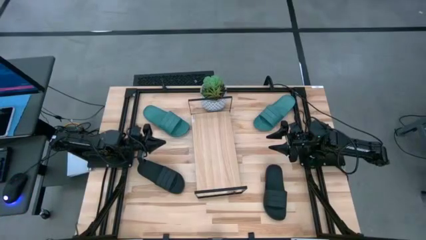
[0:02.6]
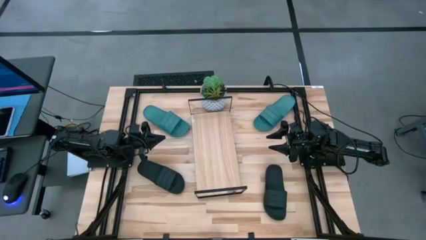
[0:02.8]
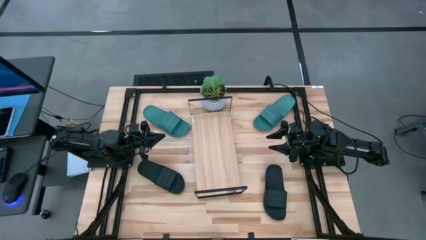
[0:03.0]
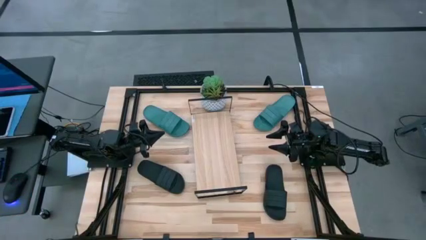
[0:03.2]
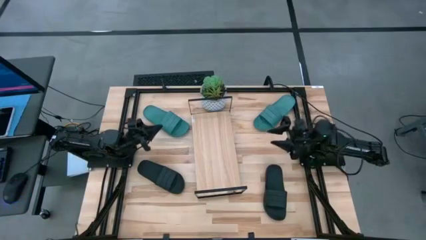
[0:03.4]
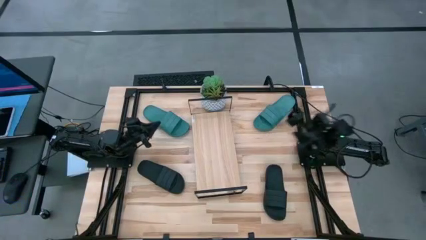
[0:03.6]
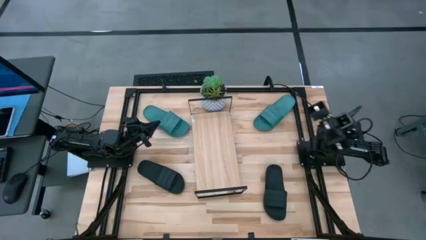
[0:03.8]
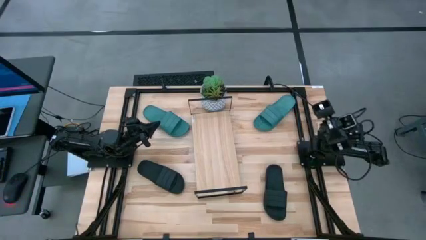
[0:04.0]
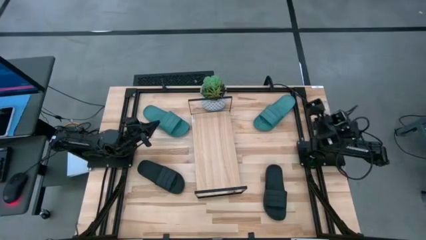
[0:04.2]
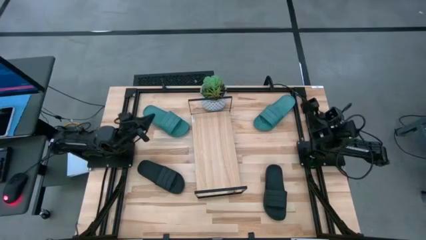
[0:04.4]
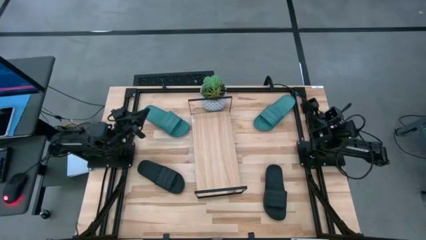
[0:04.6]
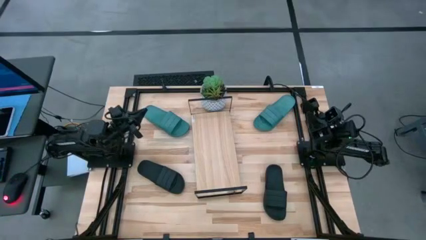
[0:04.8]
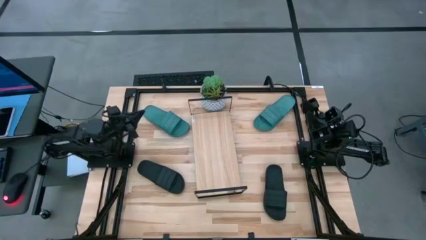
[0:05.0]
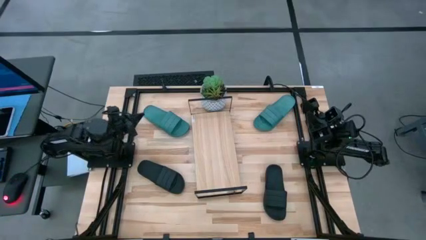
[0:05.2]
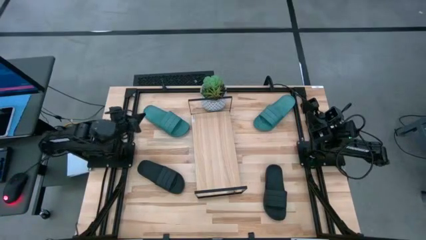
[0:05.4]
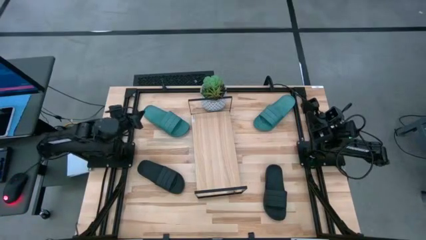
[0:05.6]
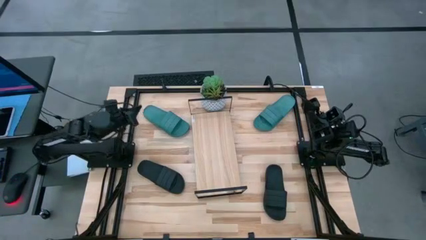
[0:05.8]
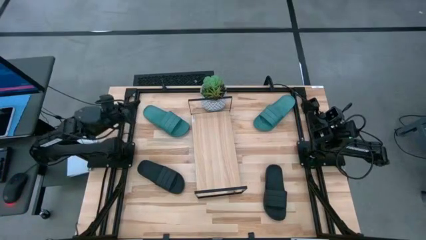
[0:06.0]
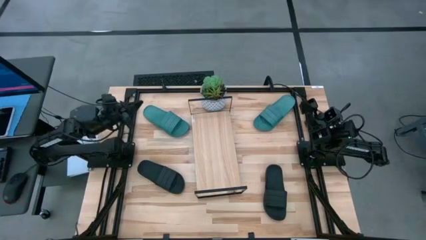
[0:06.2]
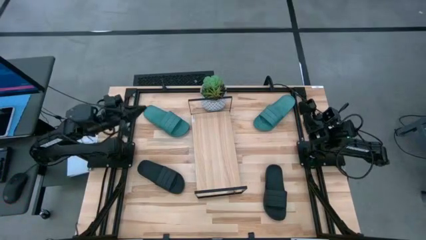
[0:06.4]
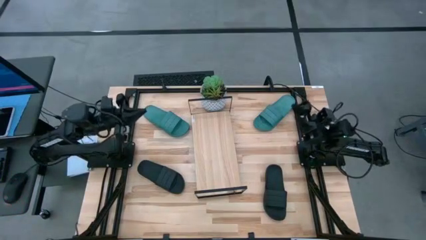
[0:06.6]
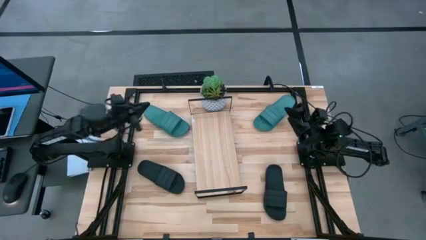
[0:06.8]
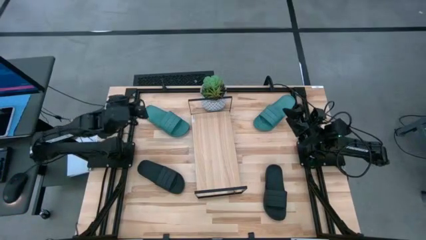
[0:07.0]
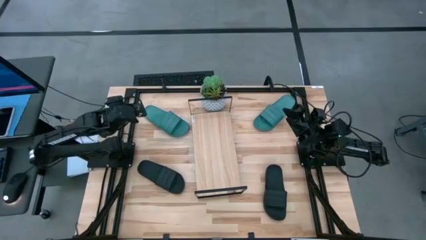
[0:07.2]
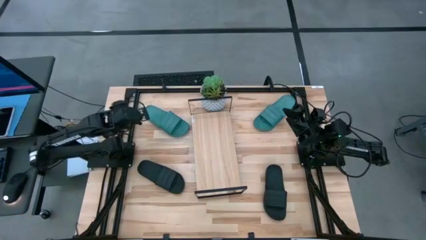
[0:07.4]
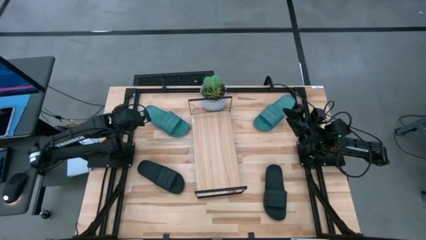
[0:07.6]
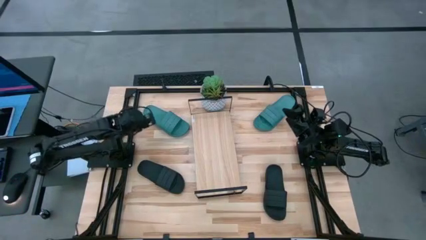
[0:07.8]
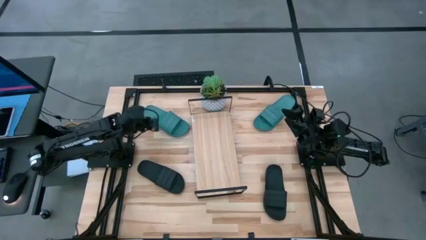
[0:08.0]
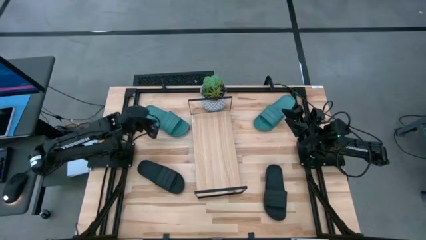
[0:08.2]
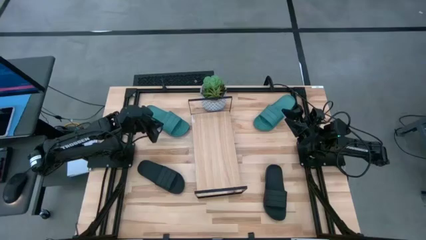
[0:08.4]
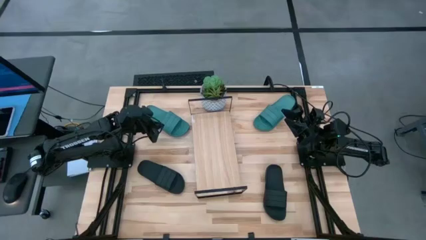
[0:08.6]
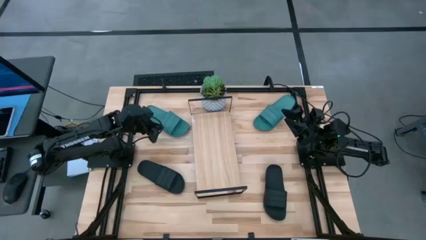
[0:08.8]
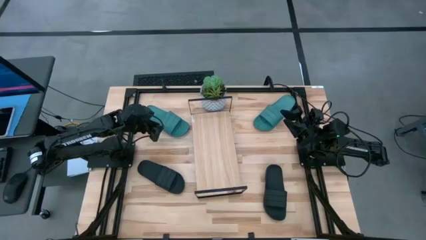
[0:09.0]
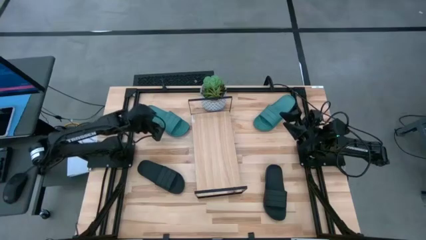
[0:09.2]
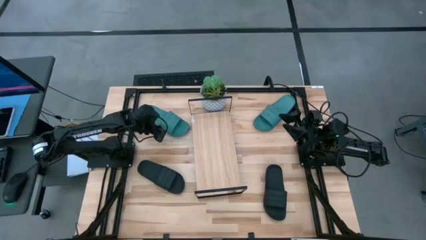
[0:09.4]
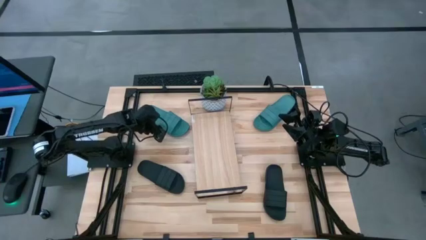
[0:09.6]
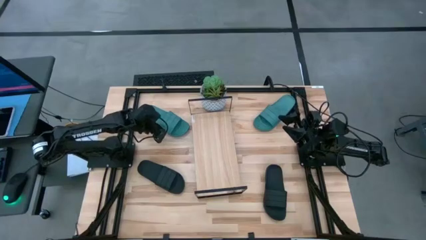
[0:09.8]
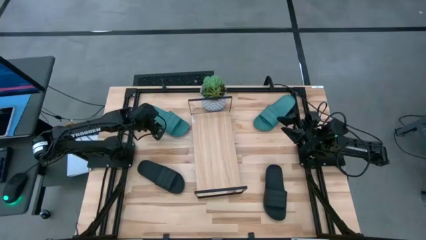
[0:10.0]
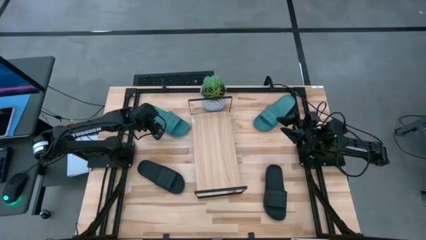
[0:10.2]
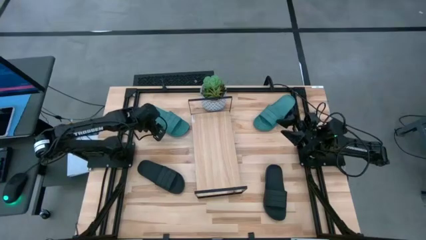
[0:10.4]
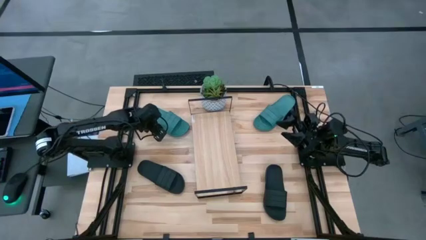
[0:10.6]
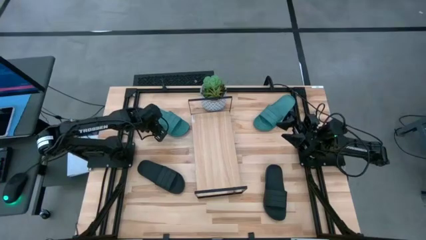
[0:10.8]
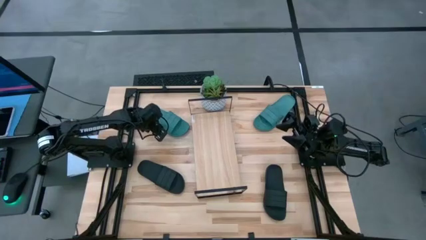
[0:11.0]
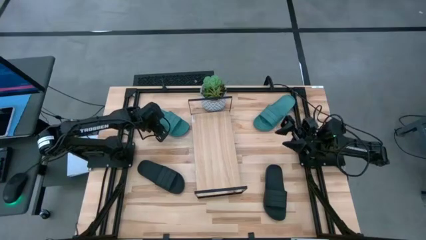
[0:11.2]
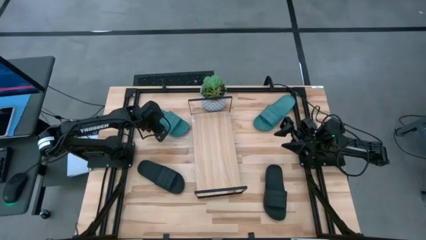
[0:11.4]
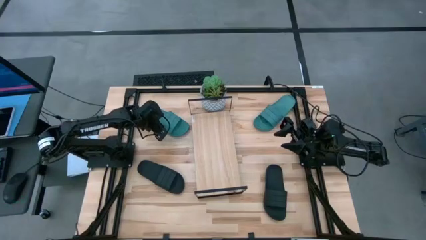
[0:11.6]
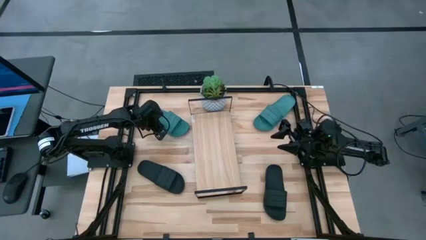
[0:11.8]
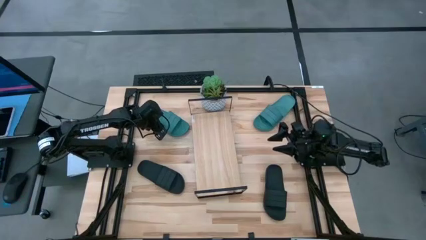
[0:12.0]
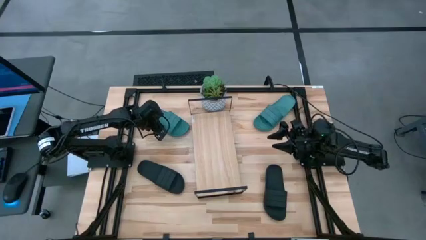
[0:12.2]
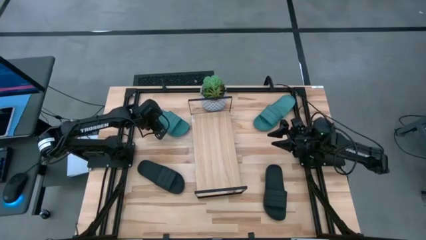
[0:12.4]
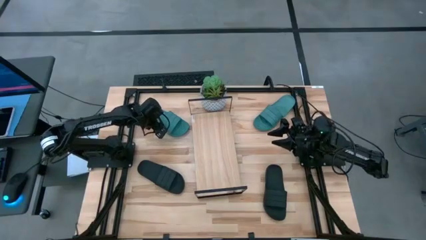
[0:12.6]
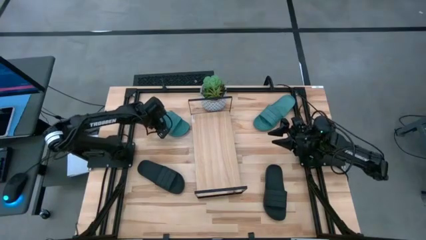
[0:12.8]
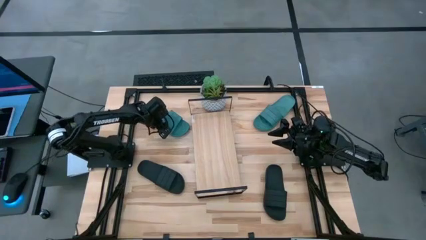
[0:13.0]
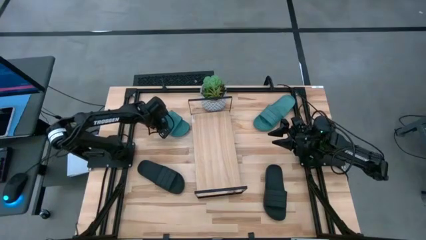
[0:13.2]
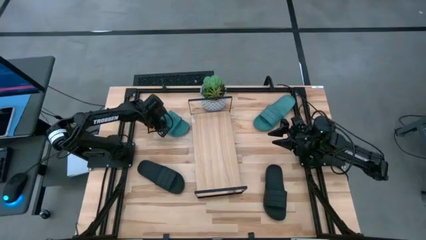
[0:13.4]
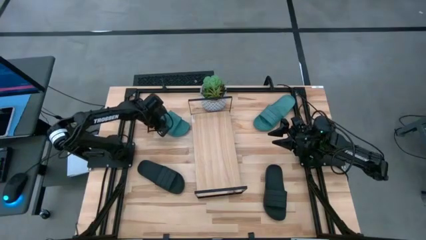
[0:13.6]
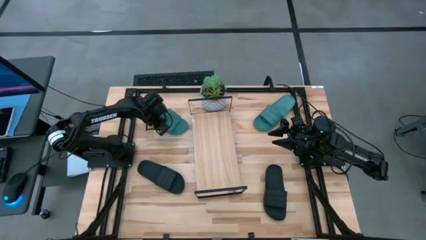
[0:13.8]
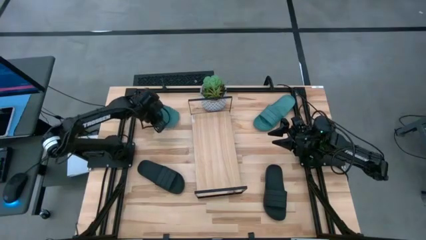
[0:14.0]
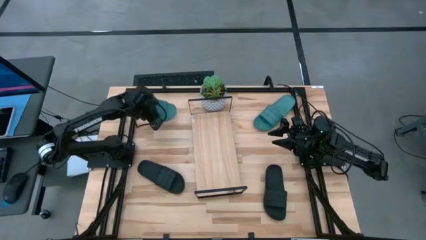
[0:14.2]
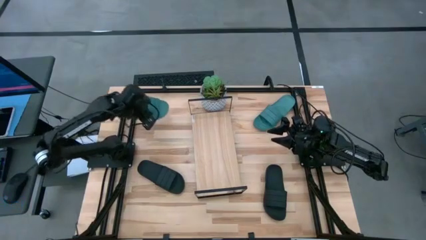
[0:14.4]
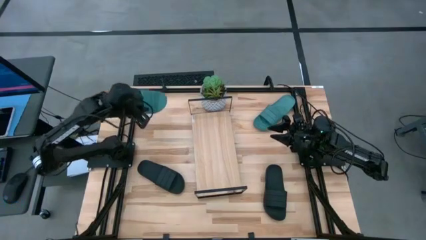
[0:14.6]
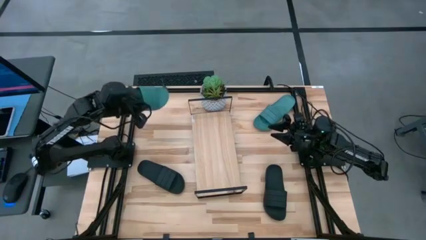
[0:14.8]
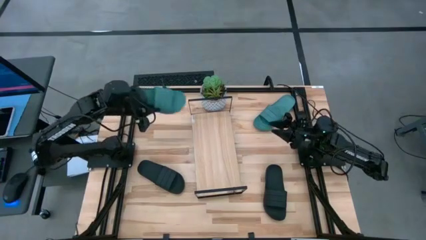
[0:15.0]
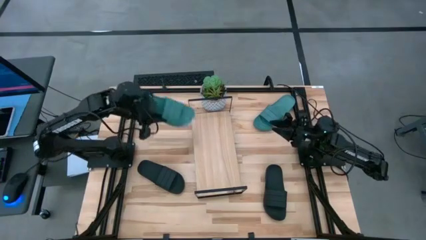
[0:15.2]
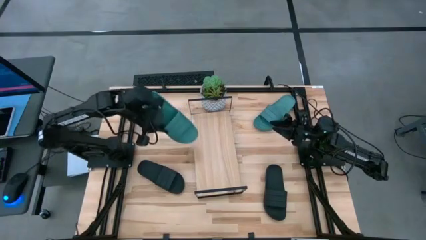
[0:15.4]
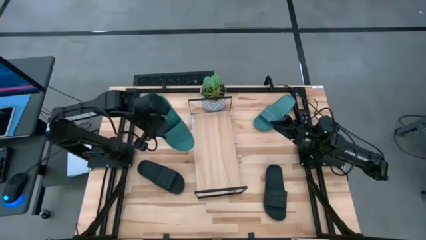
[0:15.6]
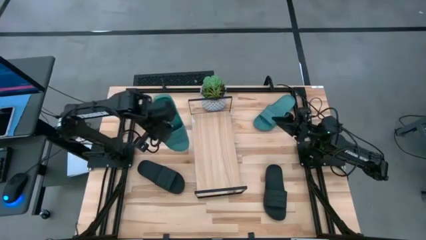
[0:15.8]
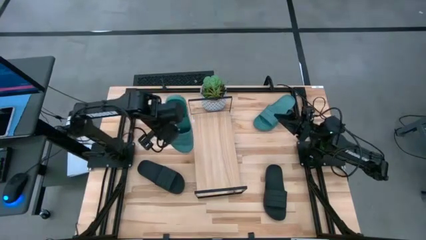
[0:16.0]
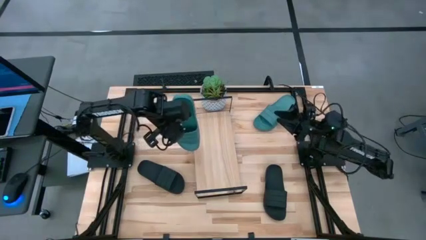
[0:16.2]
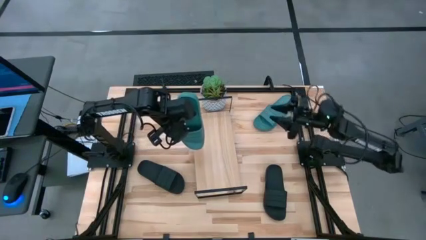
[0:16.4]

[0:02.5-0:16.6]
Task: Pick and place slides into the shelf
Put the left blue slides on the shelf
